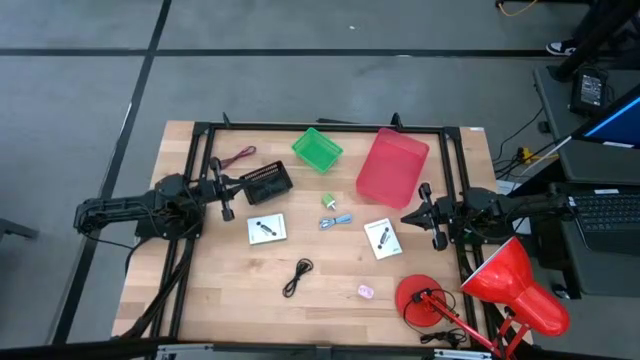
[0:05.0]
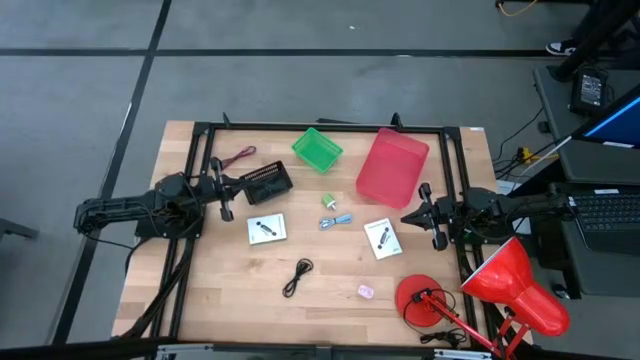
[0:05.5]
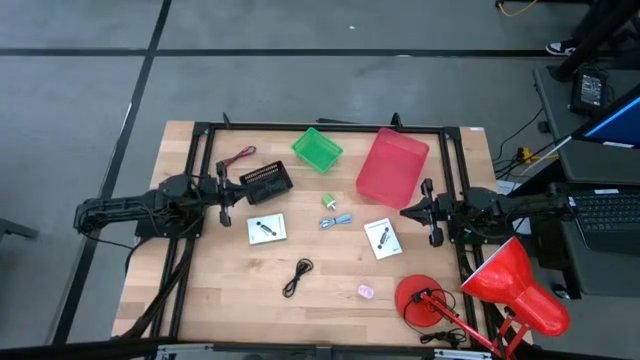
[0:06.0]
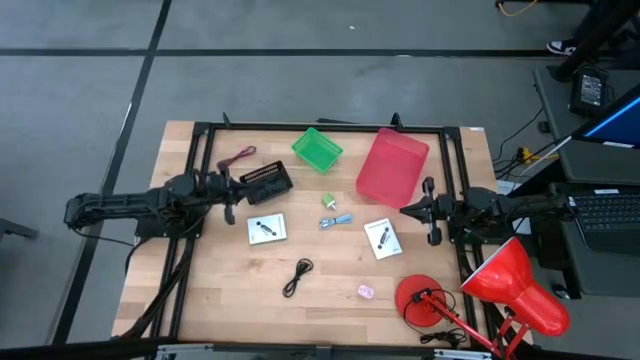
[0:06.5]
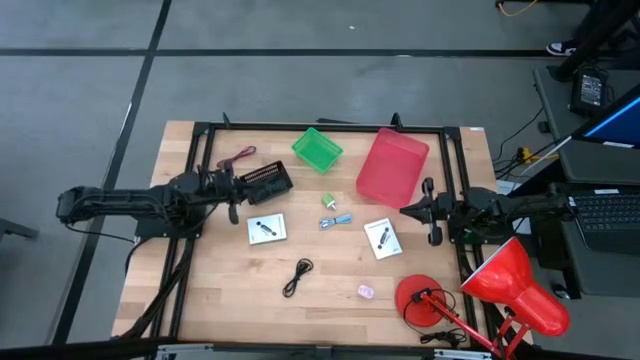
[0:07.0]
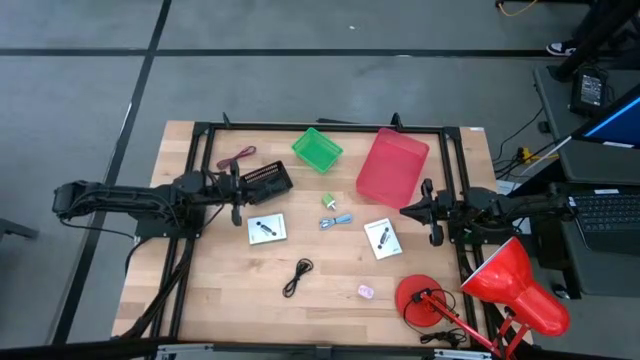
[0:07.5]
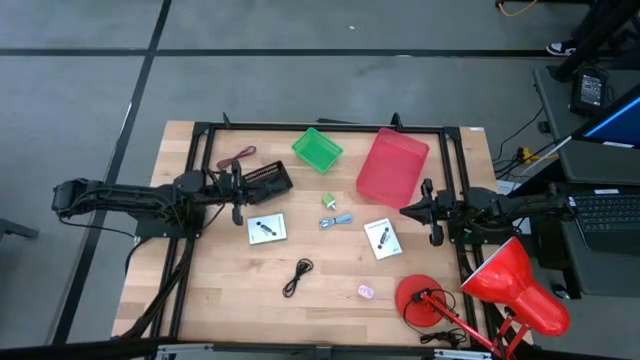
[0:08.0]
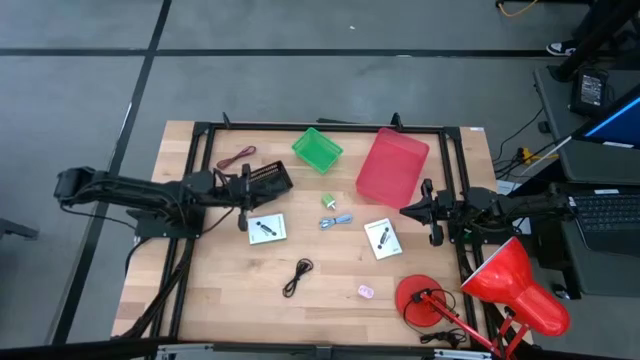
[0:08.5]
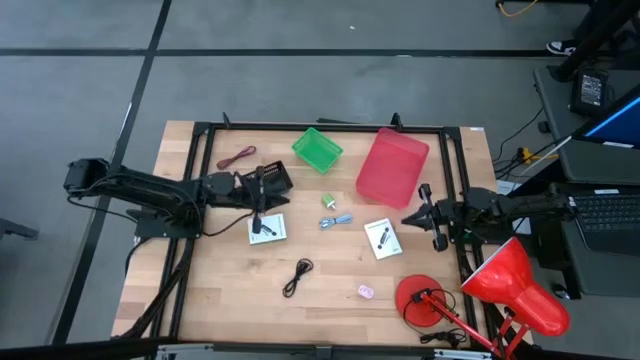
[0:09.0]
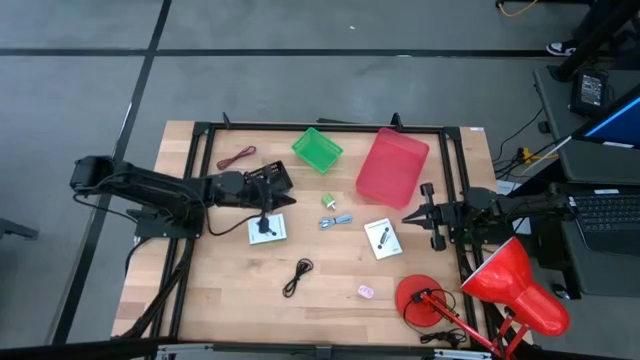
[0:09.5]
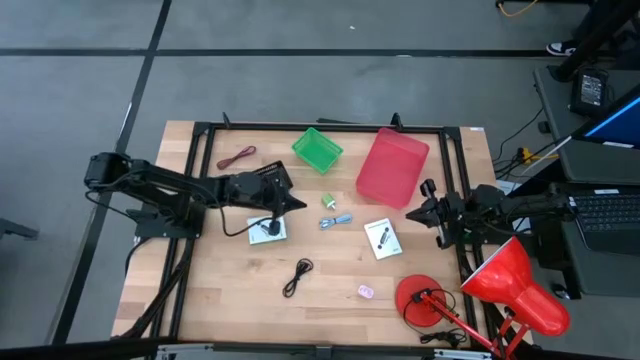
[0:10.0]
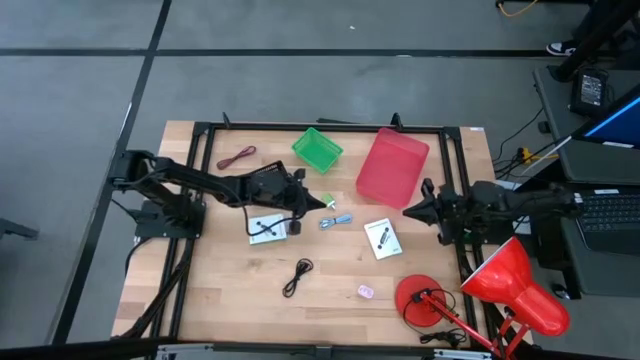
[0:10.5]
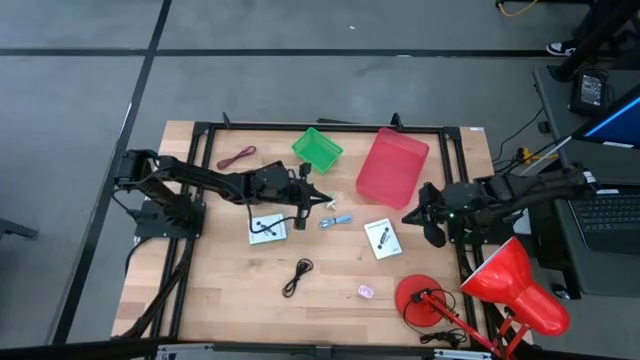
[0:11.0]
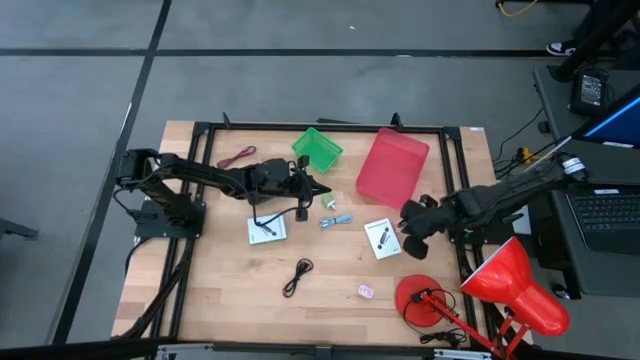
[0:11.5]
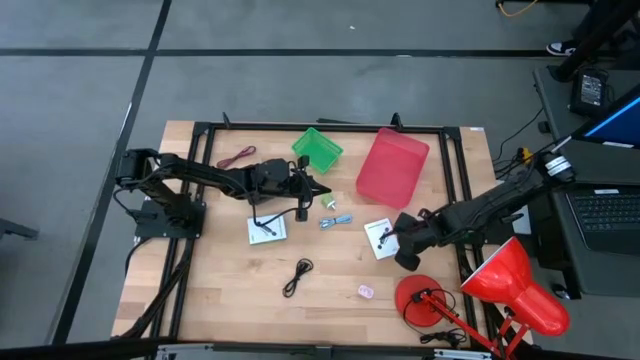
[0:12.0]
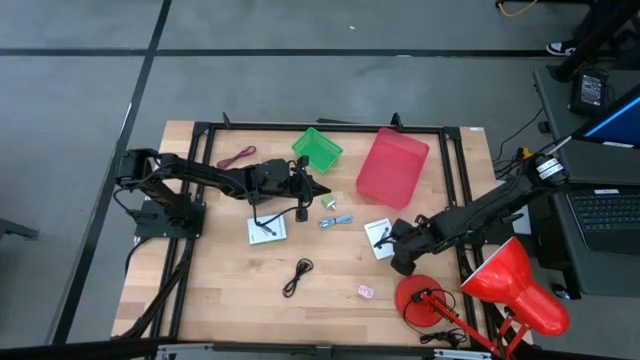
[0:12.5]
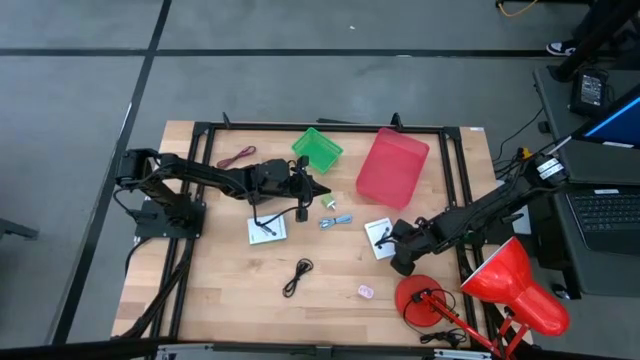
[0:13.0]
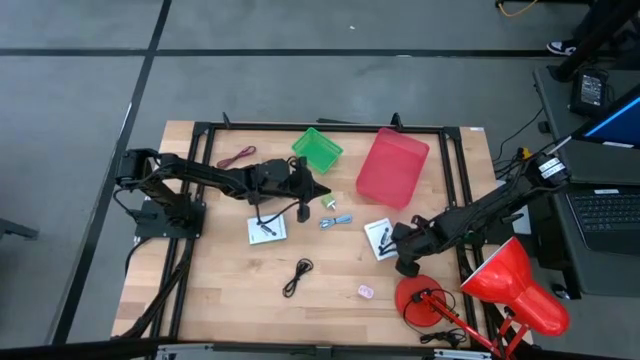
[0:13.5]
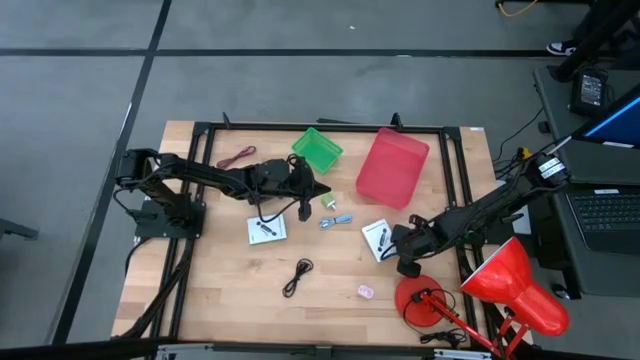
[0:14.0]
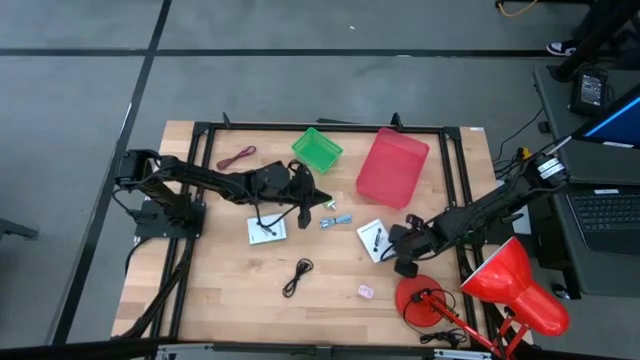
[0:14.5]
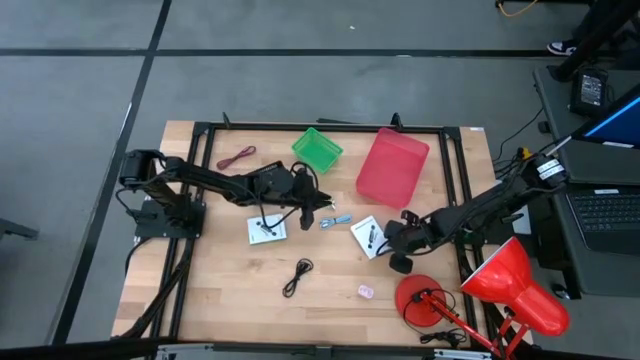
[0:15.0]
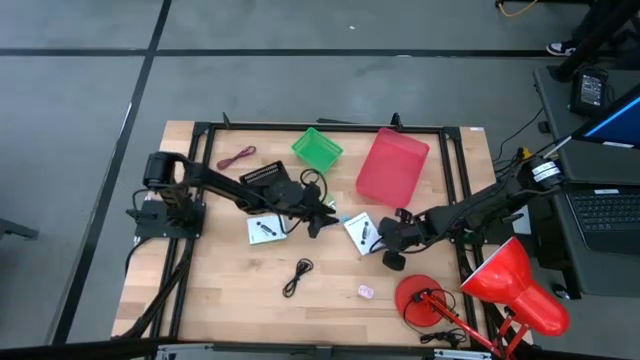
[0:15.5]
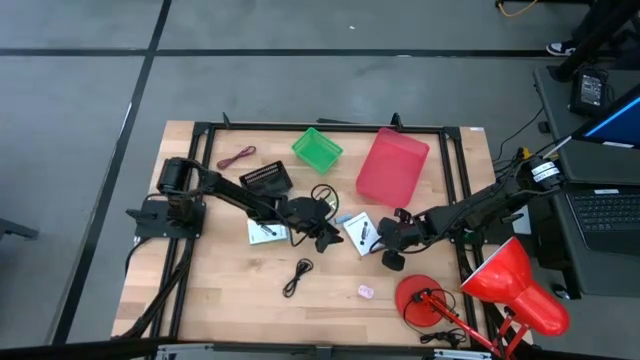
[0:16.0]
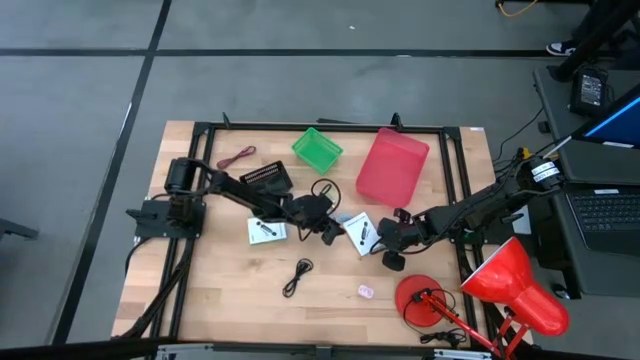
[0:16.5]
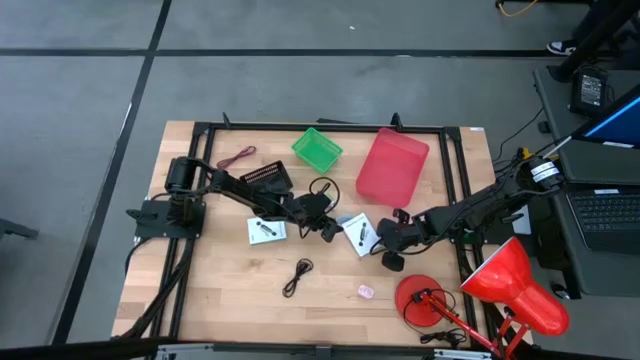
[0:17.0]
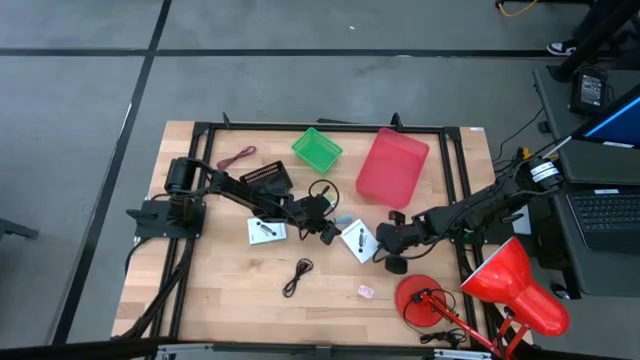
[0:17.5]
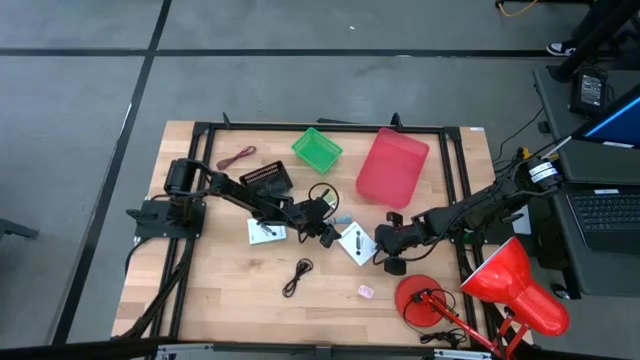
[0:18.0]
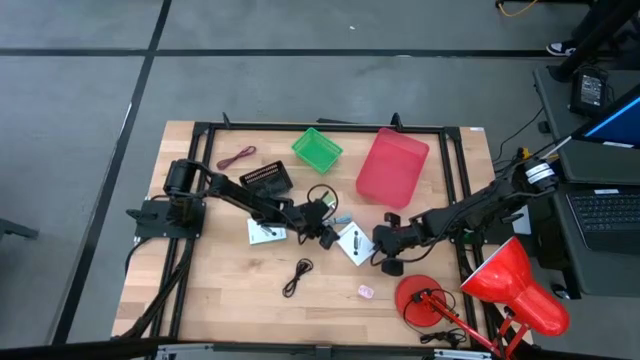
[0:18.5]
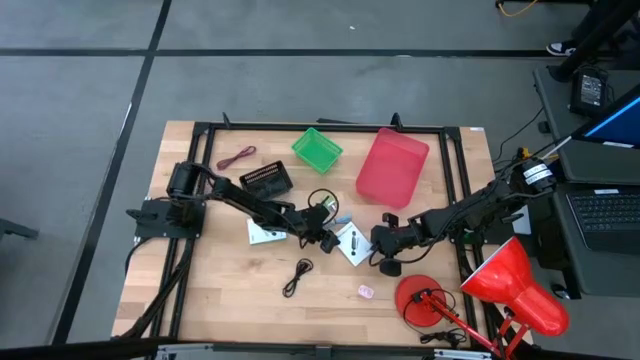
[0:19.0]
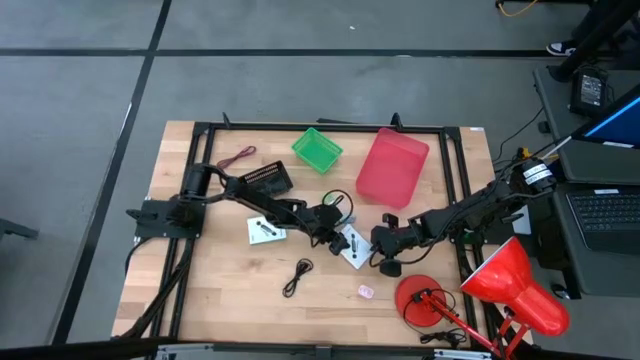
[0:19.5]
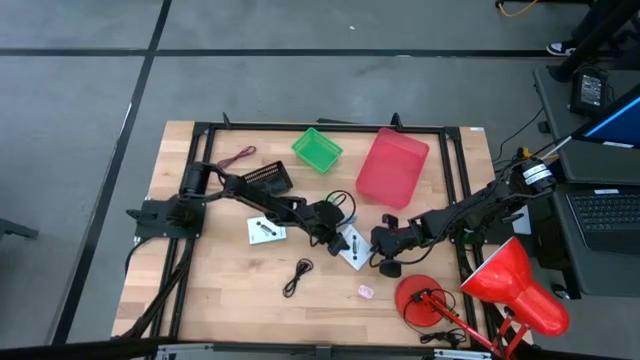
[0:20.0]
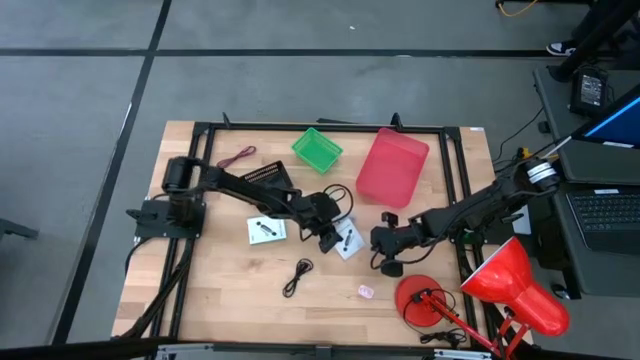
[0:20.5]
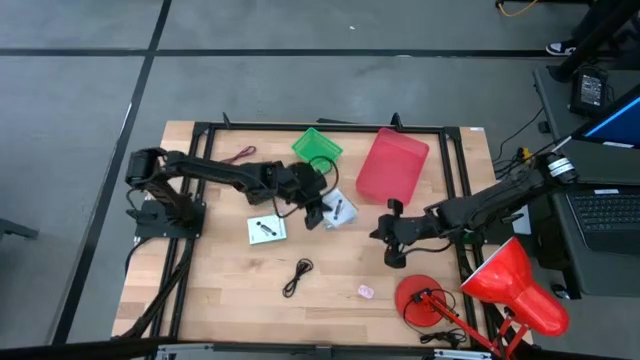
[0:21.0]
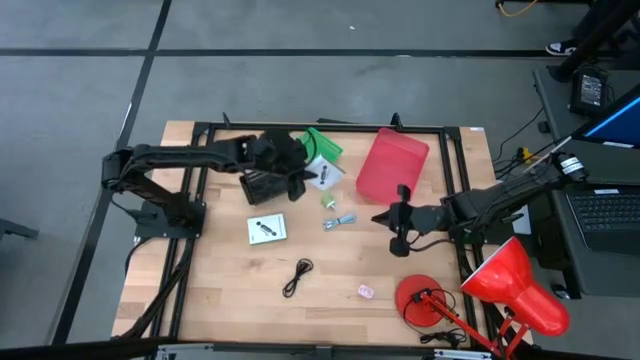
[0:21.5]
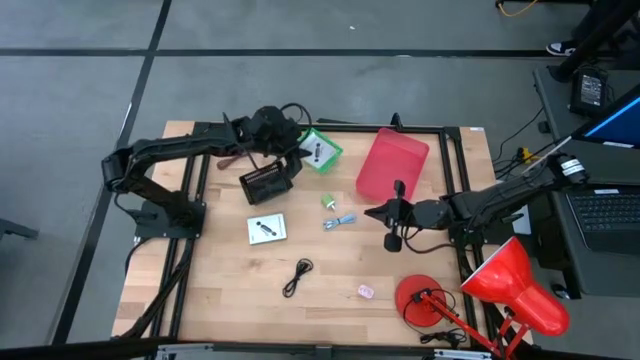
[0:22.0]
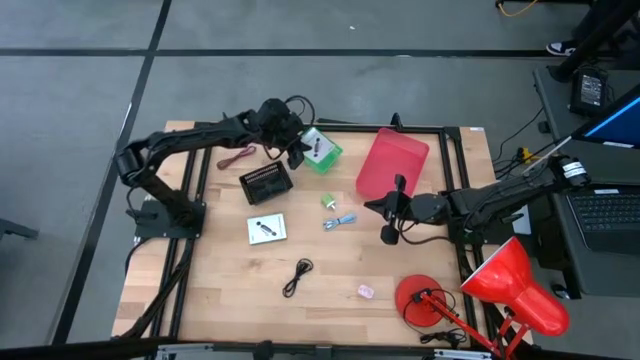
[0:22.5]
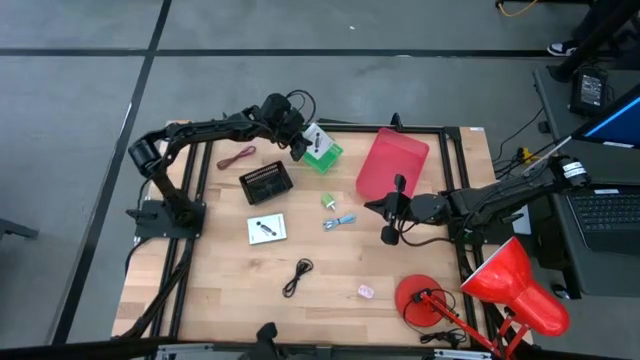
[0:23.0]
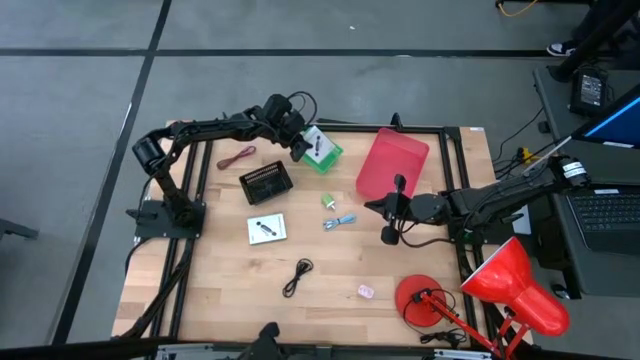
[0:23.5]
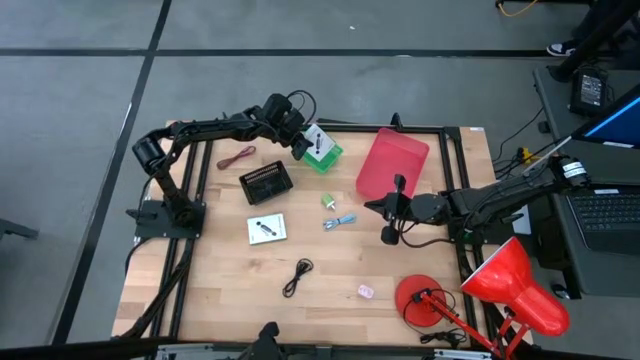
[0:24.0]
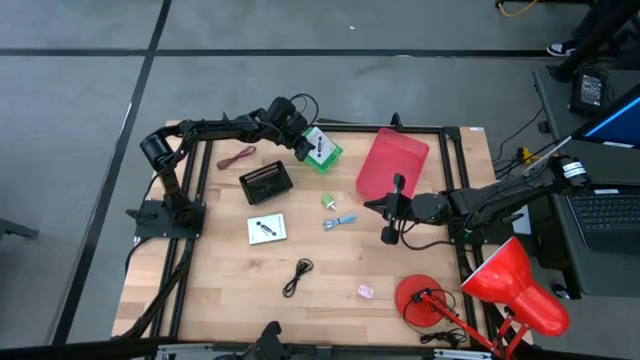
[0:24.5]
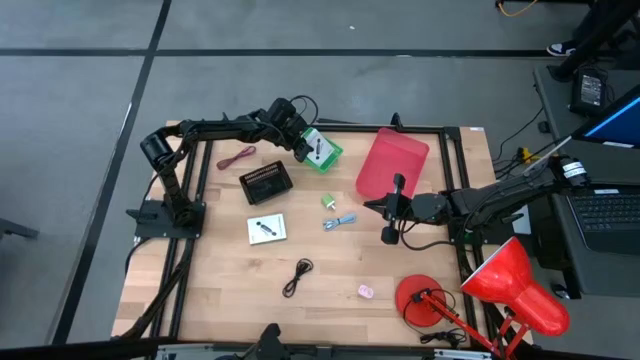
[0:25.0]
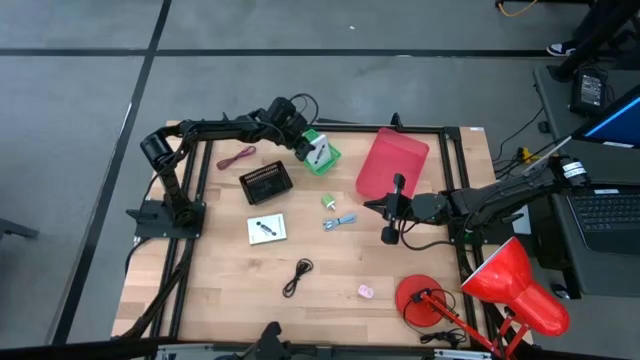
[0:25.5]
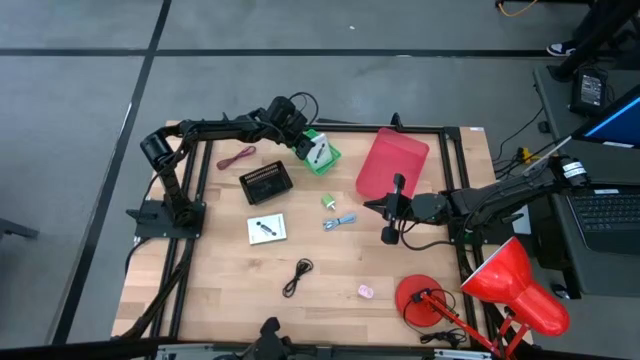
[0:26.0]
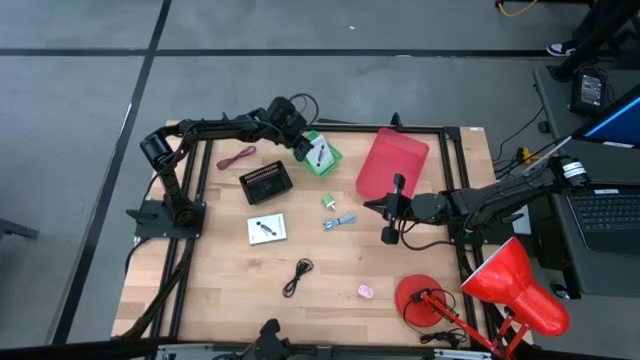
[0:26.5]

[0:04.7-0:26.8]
Task: Pick and place items into bin
Put the white card reader box into the green bin
